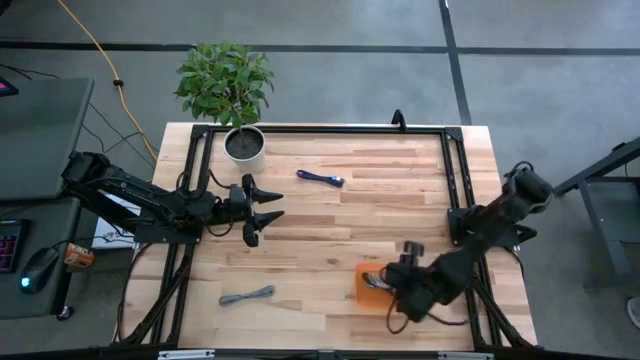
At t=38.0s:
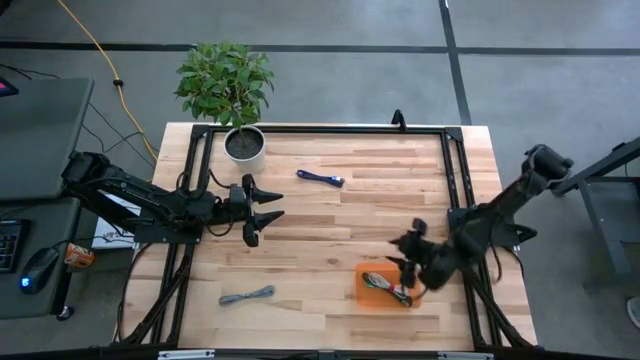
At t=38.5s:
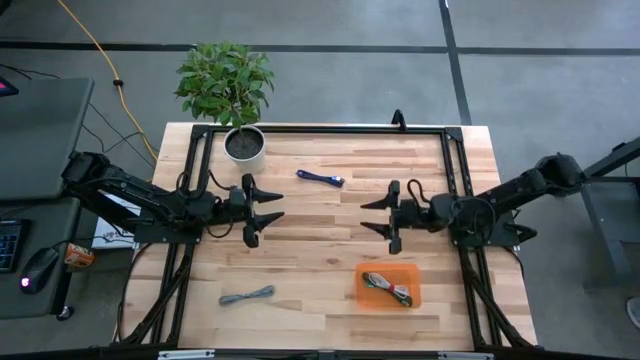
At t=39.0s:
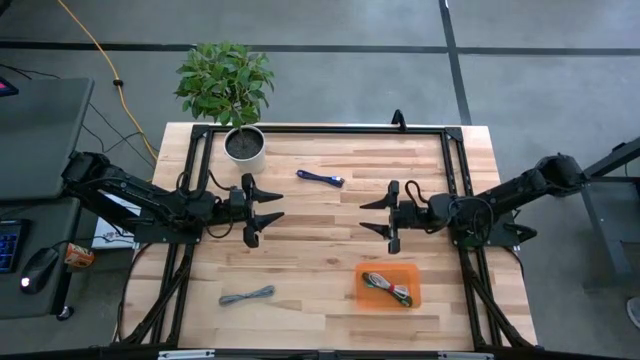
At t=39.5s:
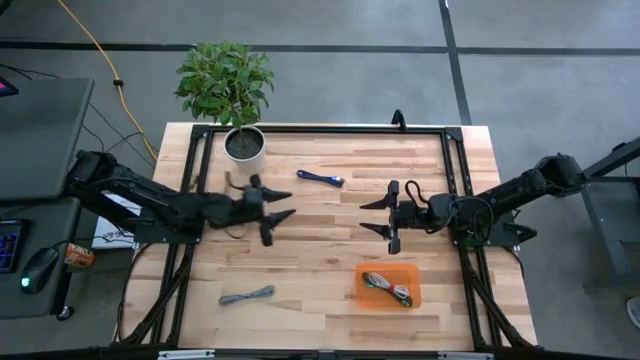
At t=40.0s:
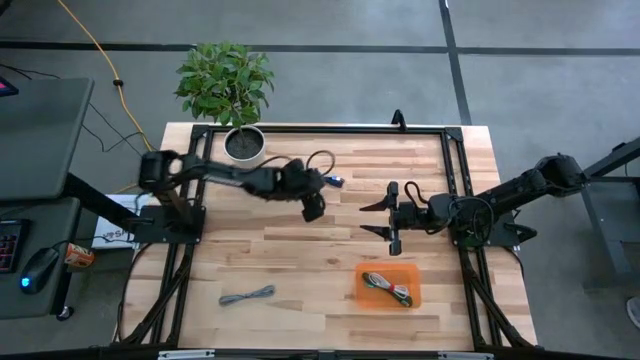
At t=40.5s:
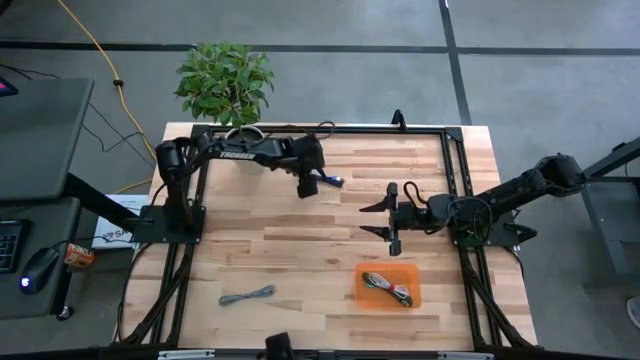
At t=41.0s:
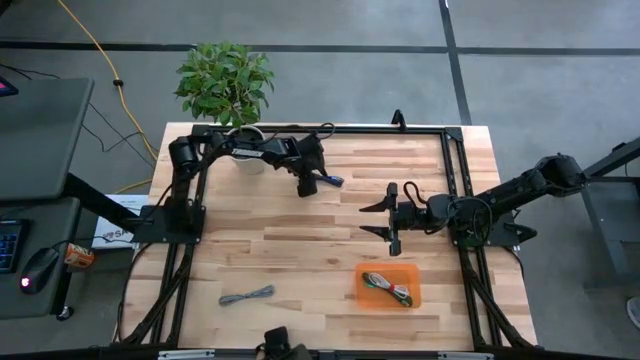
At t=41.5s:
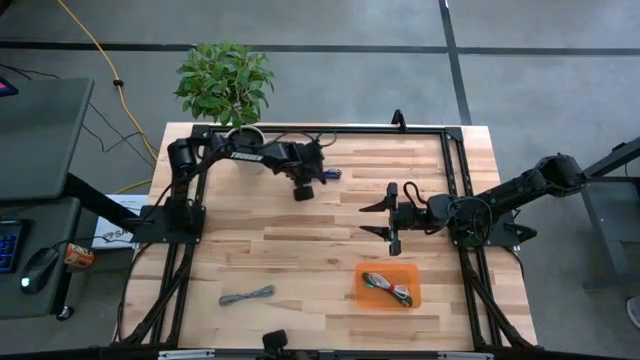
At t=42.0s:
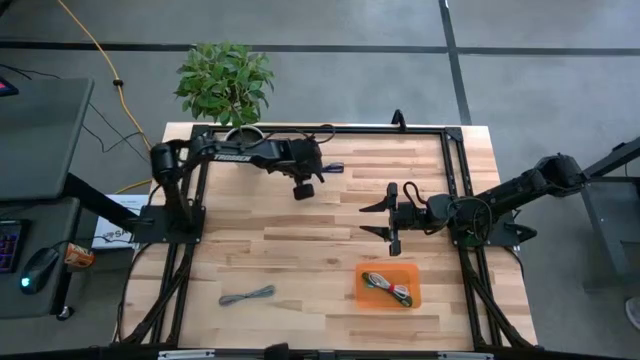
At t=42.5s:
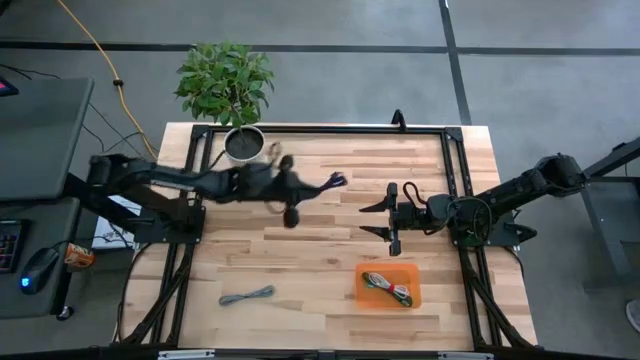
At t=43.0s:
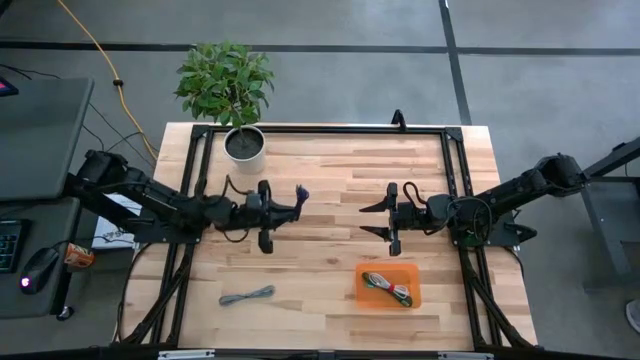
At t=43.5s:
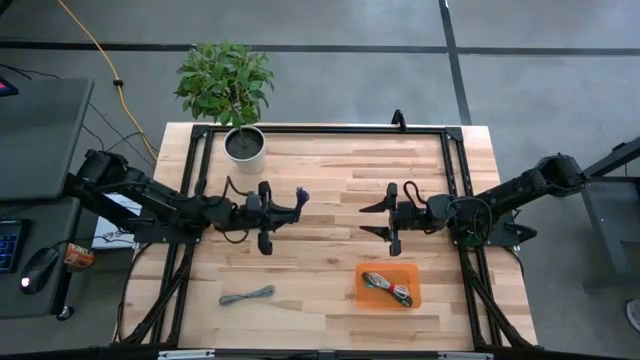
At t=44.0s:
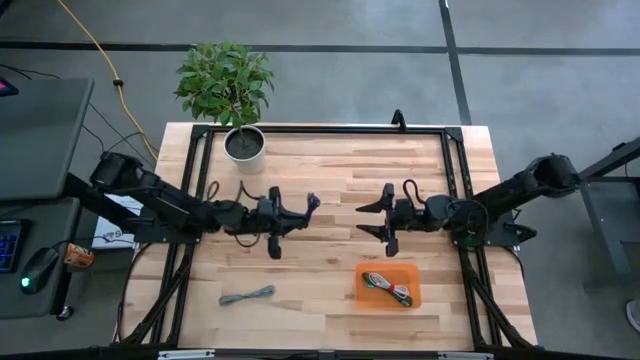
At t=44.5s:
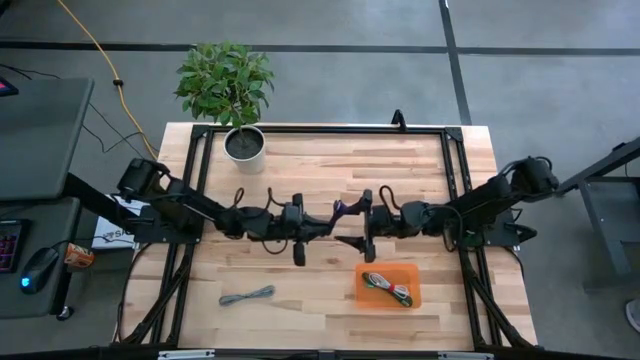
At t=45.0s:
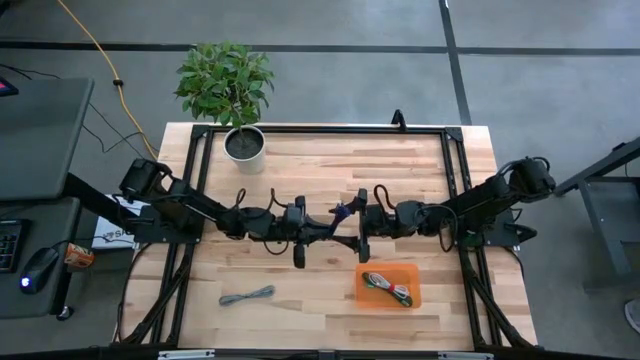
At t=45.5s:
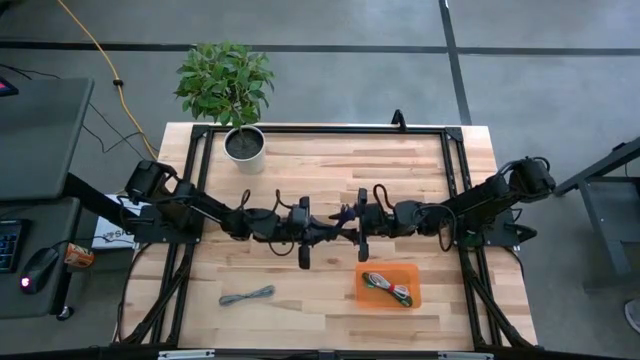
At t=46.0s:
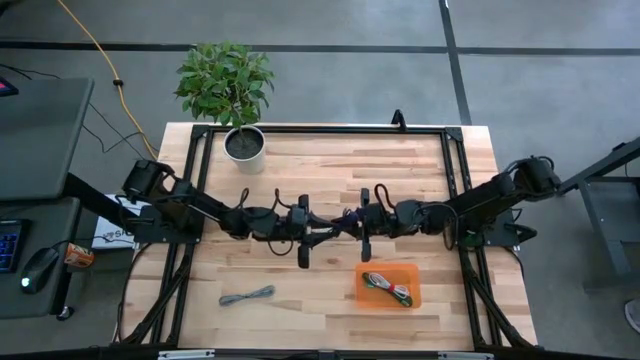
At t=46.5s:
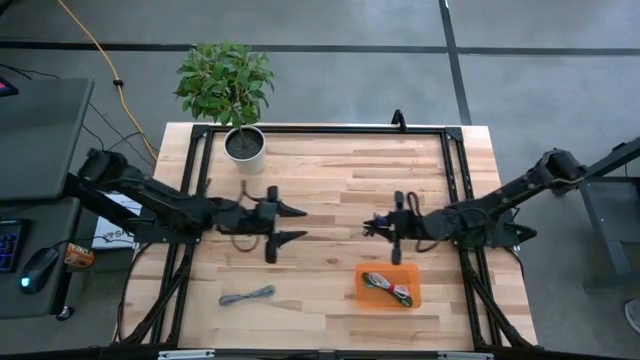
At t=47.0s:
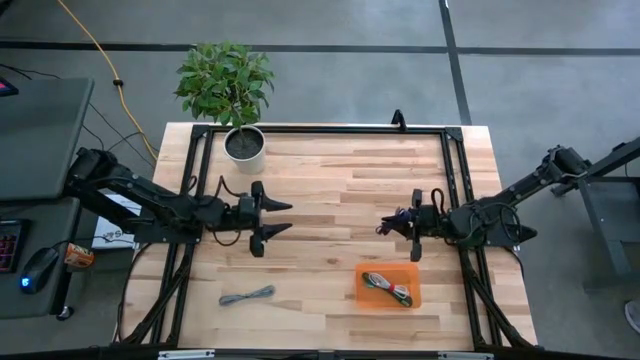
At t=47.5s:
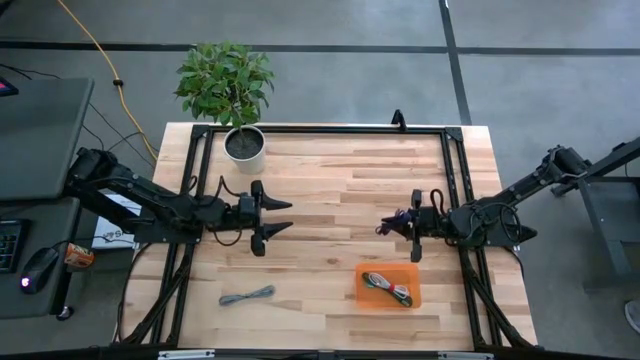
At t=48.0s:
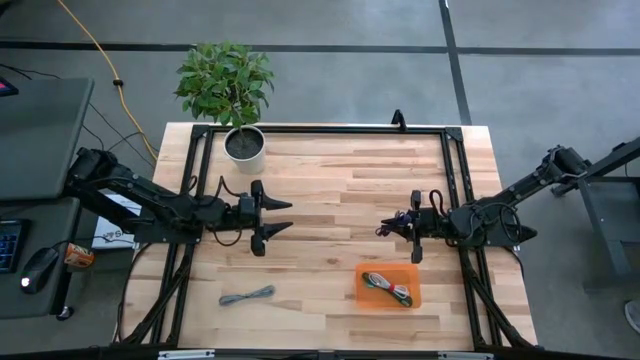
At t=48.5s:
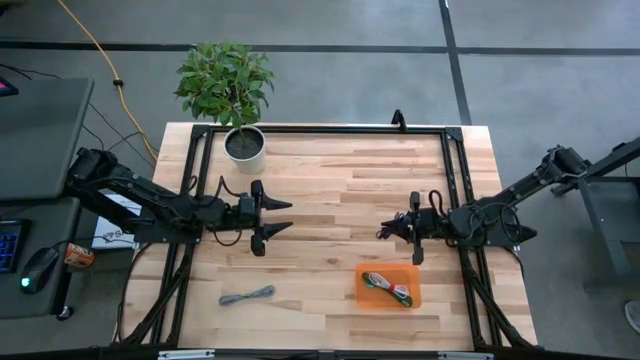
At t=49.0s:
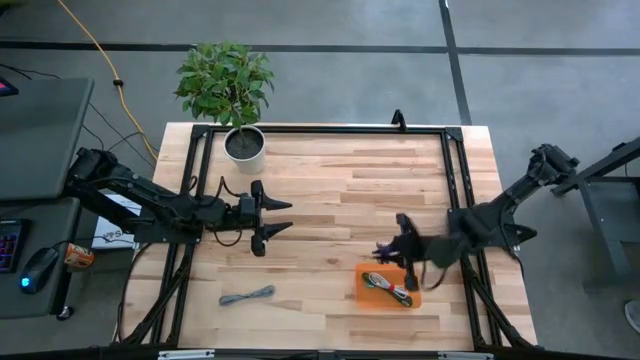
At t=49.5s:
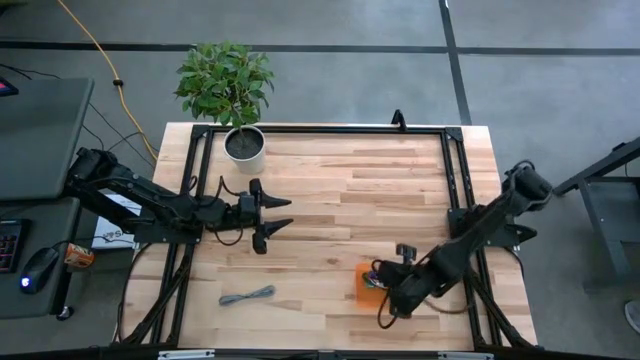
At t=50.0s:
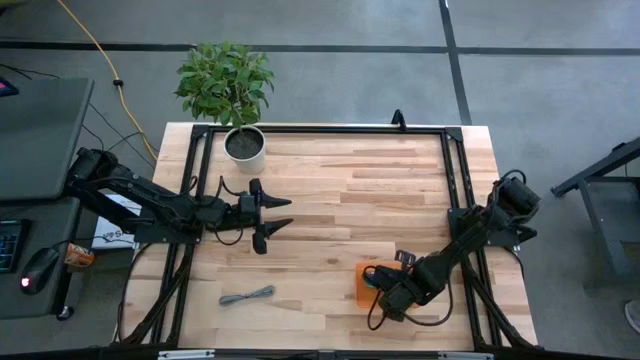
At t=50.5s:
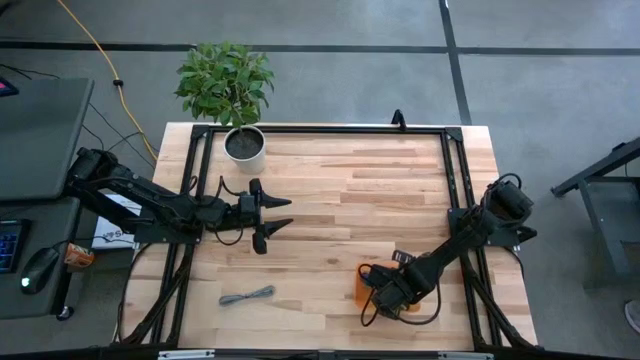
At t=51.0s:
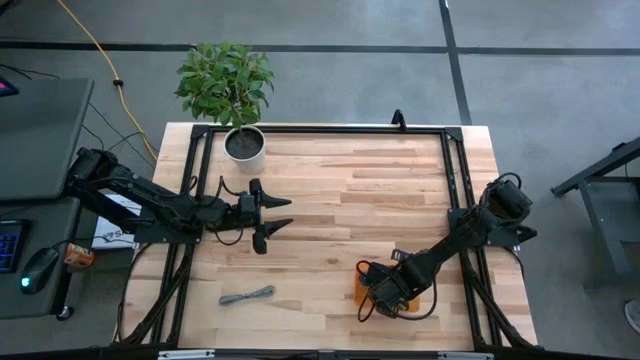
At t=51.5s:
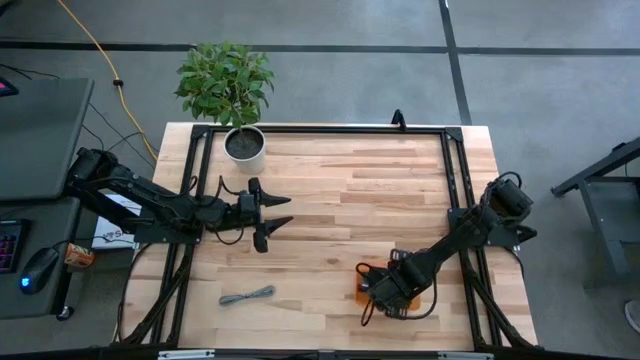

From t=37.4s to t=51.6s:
Task: Pick and place USB-C Cables
Put the violet charger cable into the orange bin

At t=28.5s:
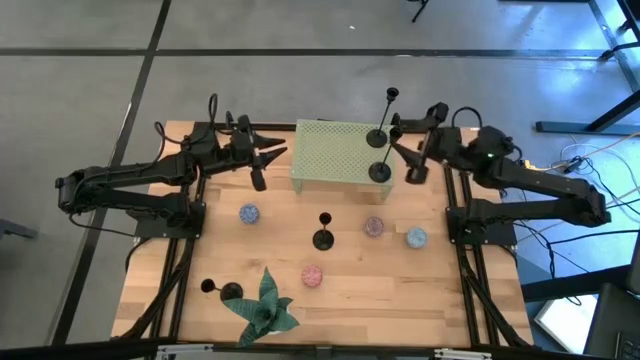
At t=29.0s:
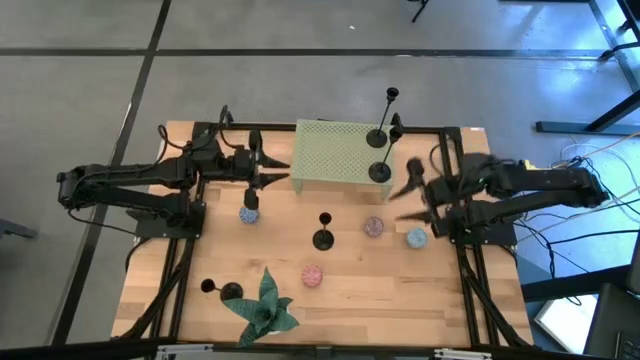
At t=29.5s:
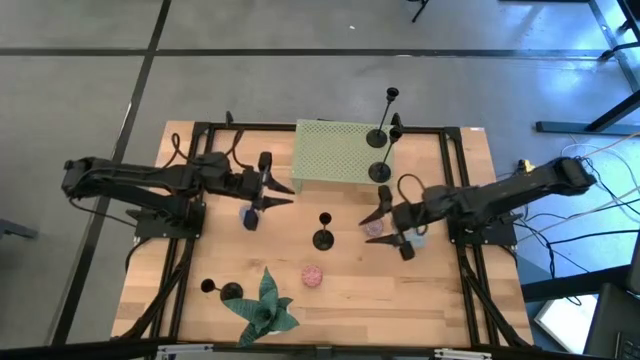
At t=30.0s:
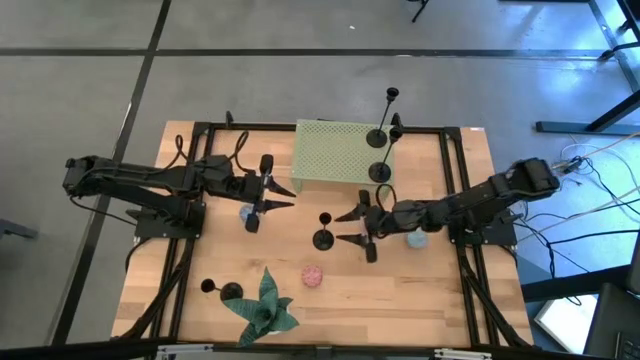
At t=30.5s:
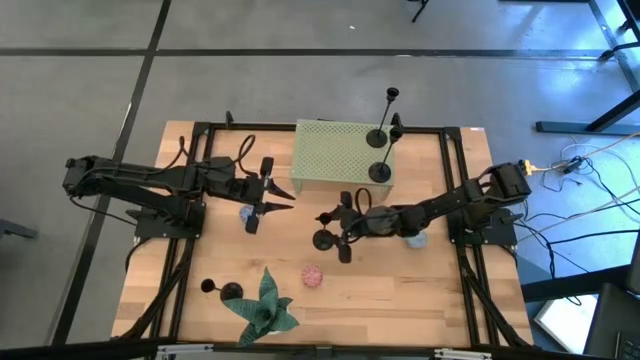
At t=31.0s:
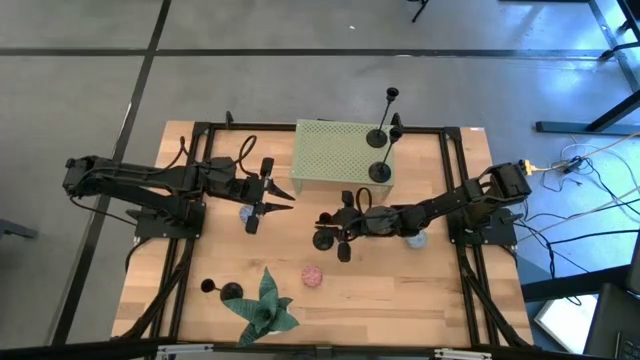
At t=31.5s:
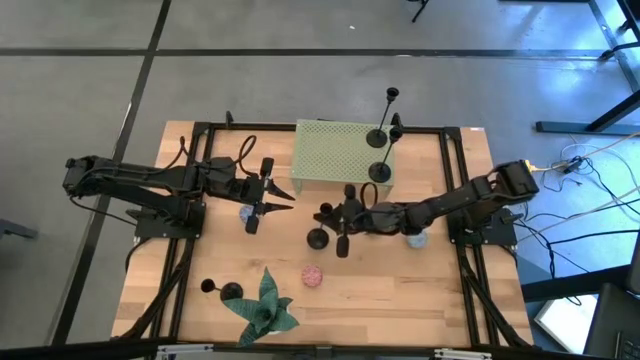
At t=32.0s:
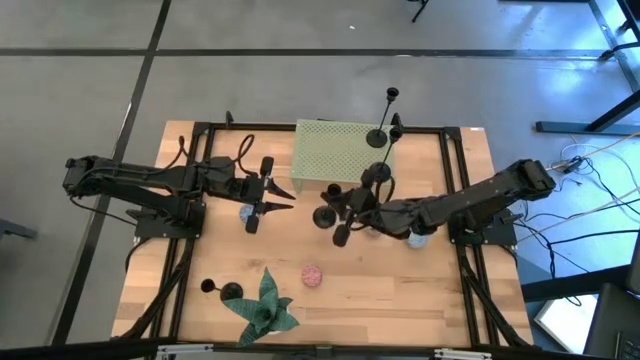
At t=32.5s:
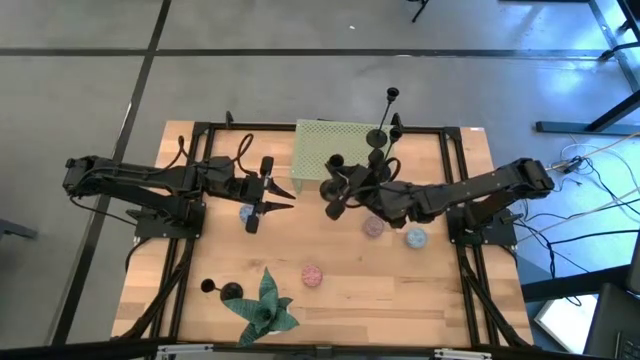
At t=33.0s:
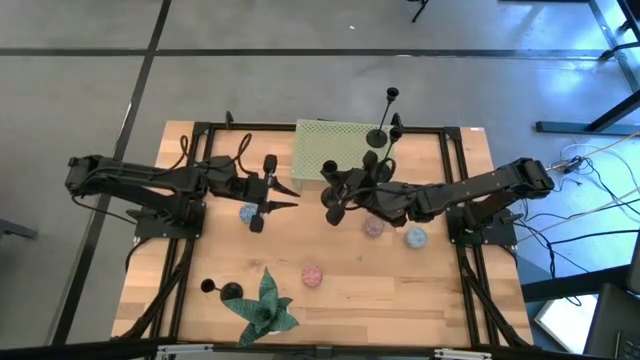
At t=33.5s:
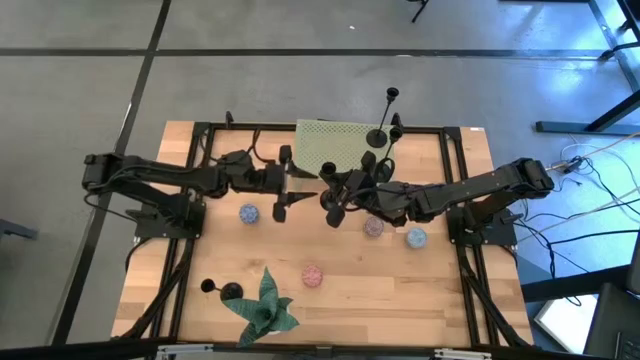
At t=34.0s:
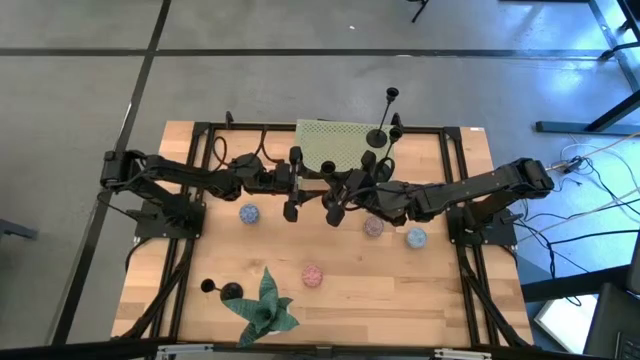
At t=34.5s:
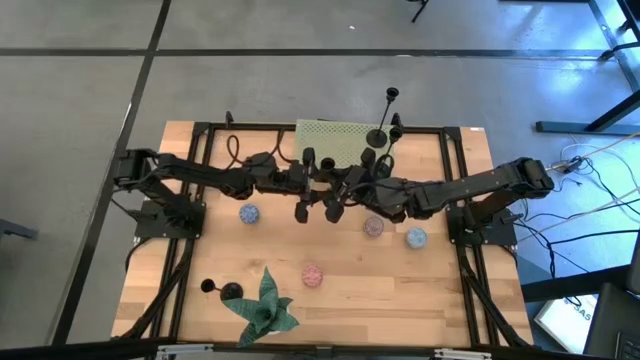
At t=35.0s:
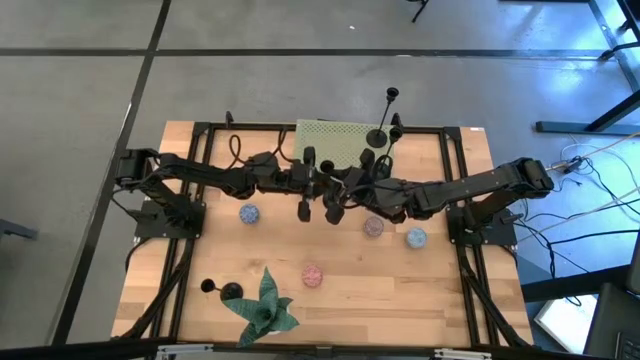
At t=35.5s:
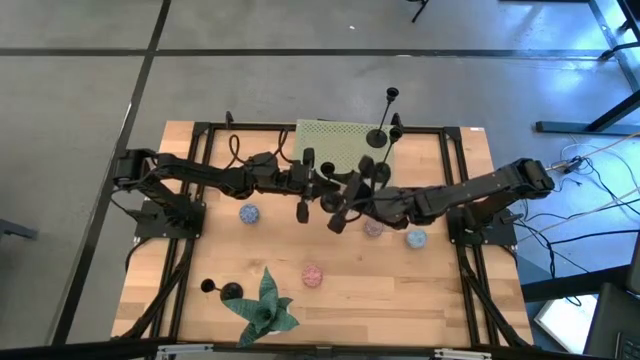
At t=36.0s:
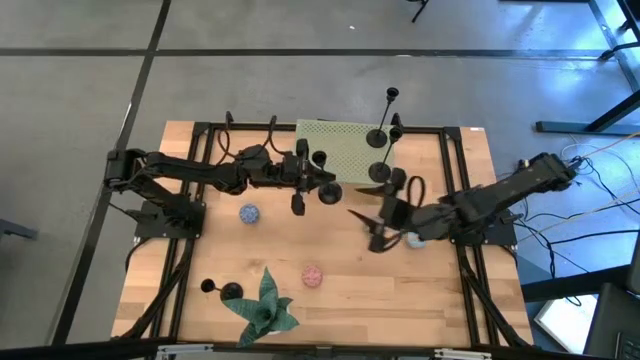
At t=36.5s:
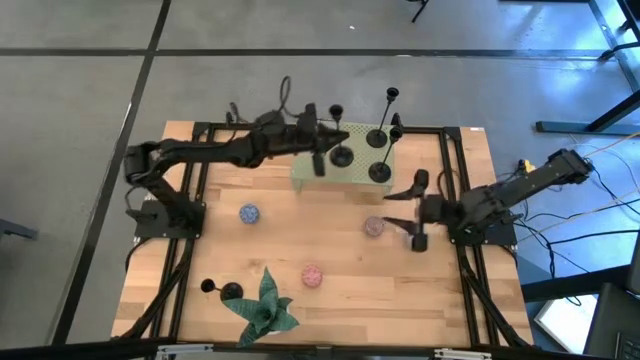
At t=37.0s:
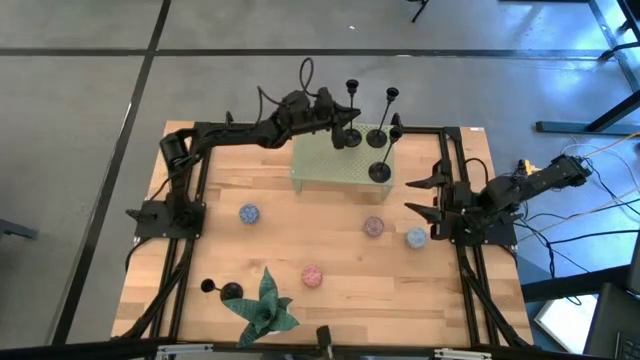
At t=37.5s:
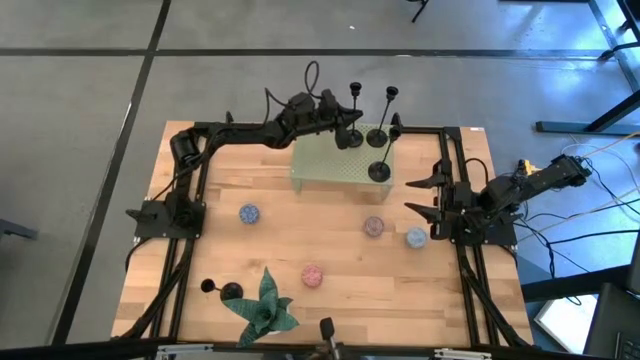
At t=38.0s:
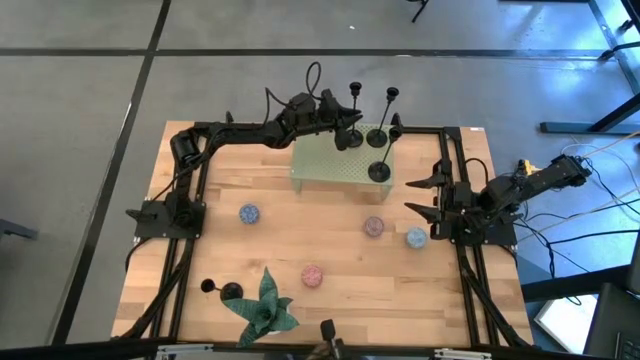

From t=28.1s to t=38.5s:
Task: Pick & Place candle stick holders
Put the black candle holder on the shelf
